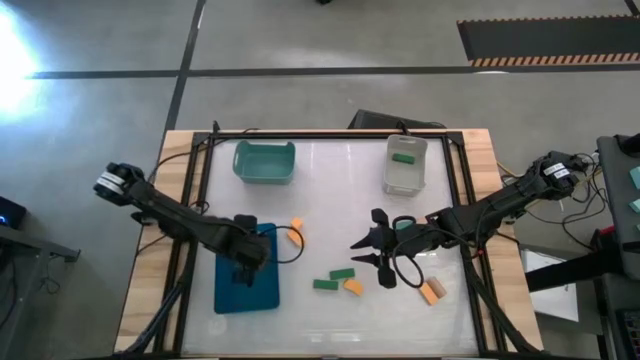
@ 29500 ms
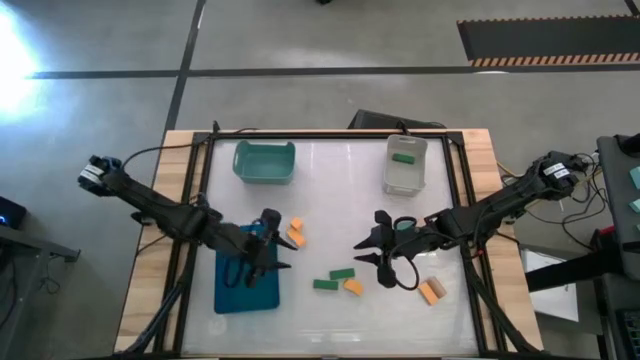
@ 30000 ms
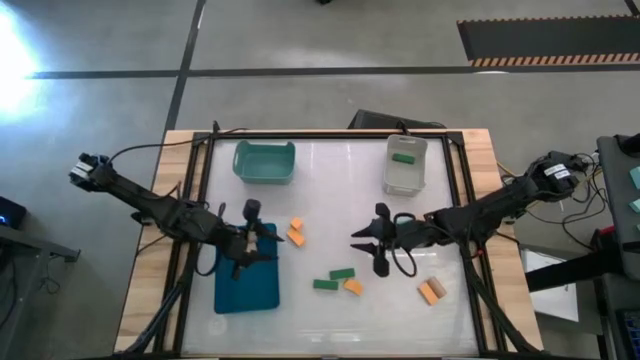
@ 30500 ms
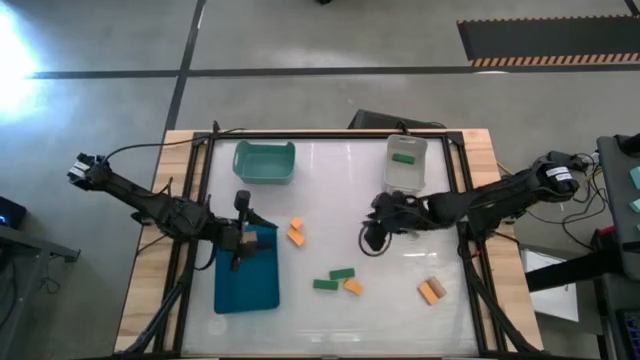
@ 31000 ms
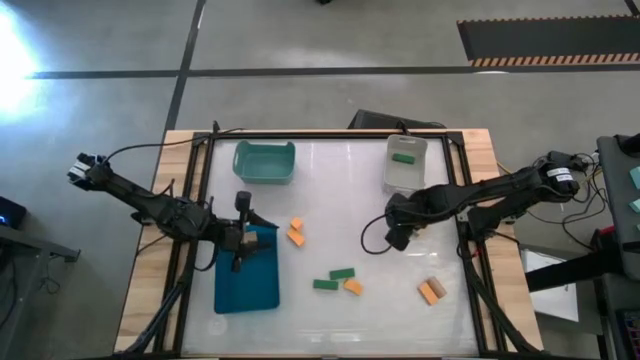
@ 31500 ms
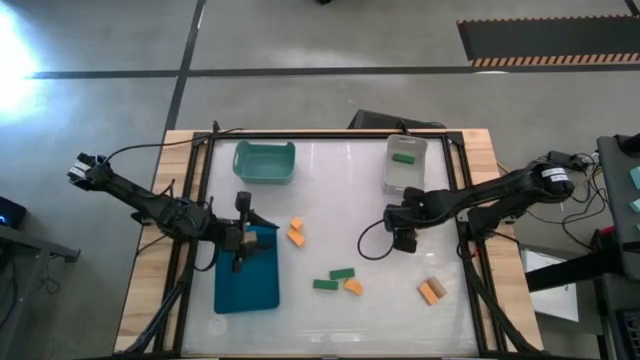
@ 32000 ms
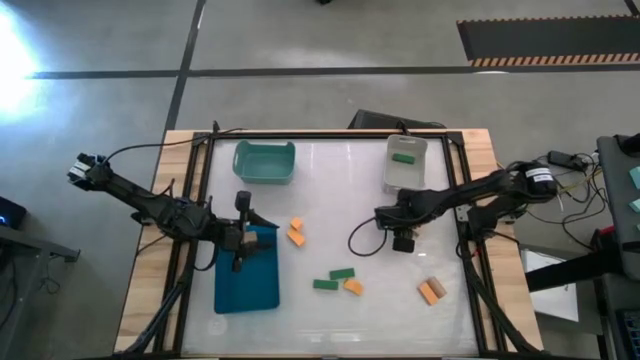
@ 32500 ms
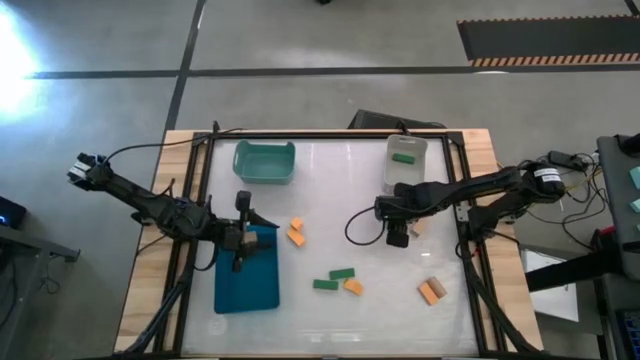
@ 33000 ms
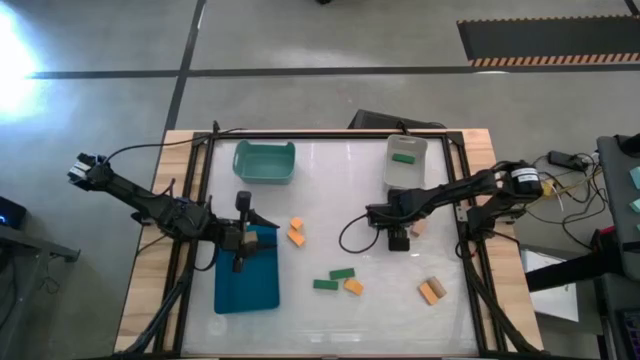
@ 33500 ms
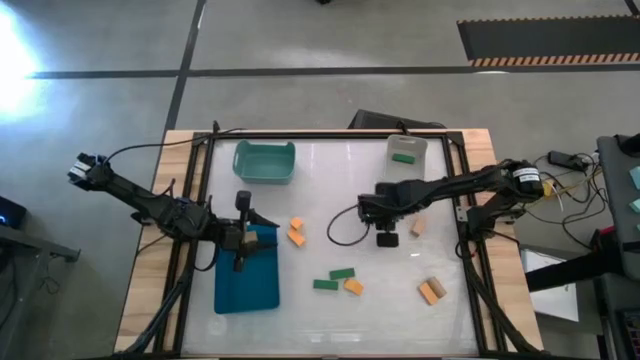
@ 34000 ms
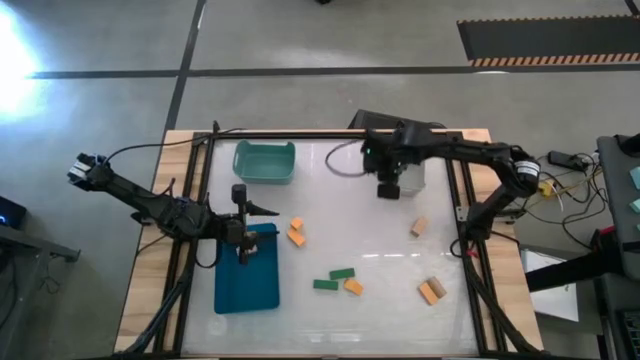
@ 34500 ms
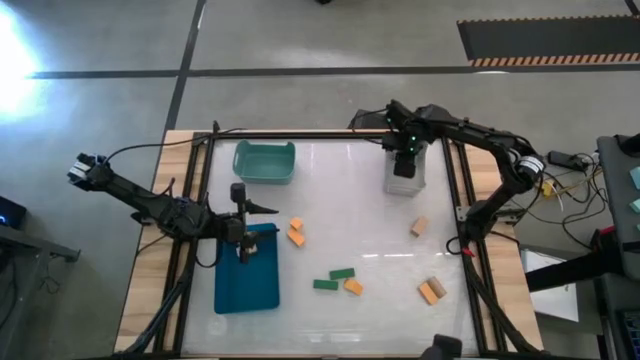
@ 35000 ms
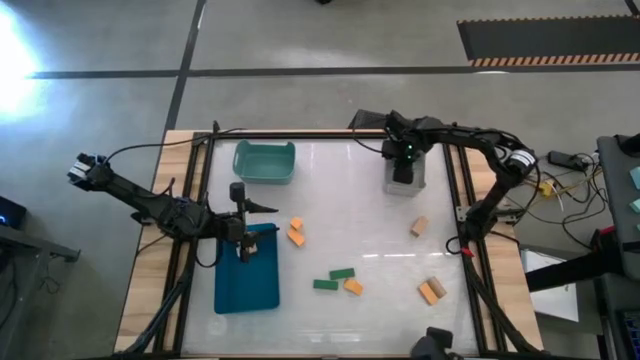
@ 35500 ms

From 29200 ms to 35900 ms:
Task: Sort & place blocks by color
Put the light green block into the gray bin

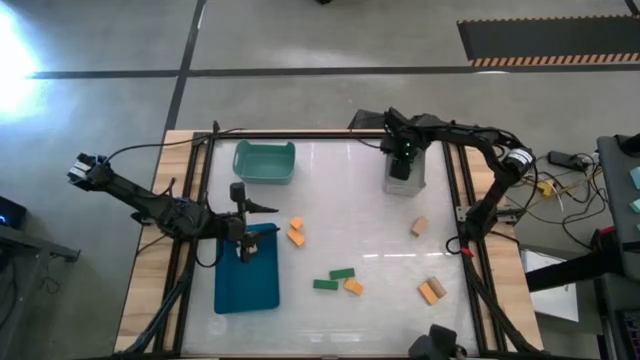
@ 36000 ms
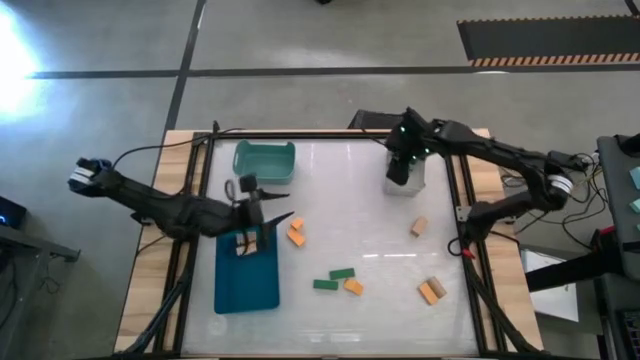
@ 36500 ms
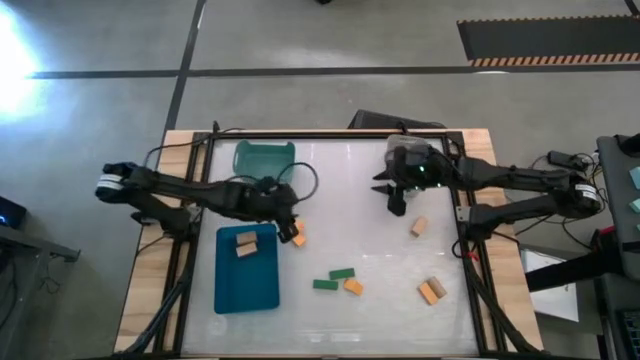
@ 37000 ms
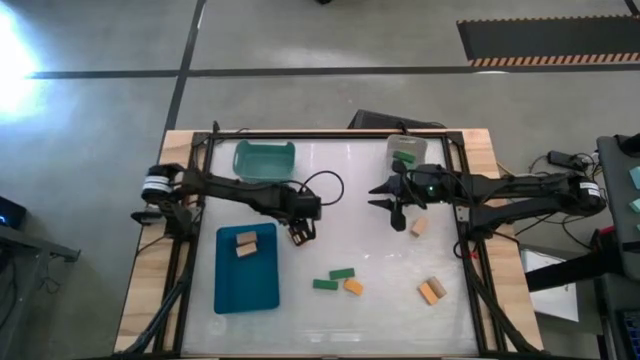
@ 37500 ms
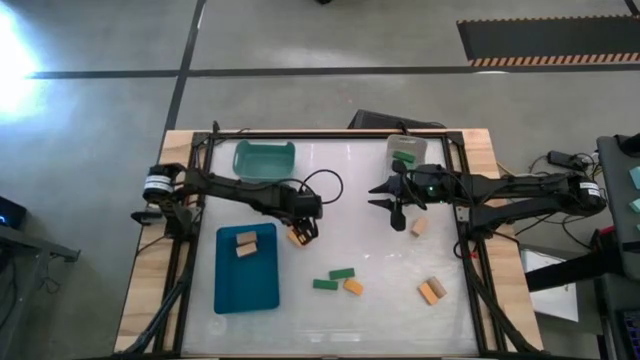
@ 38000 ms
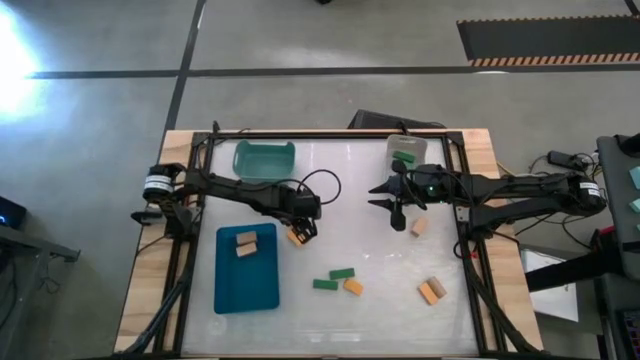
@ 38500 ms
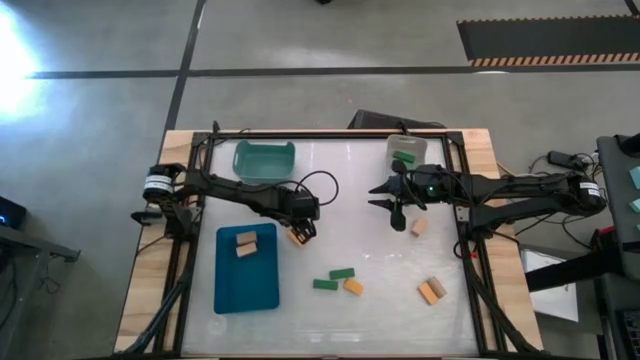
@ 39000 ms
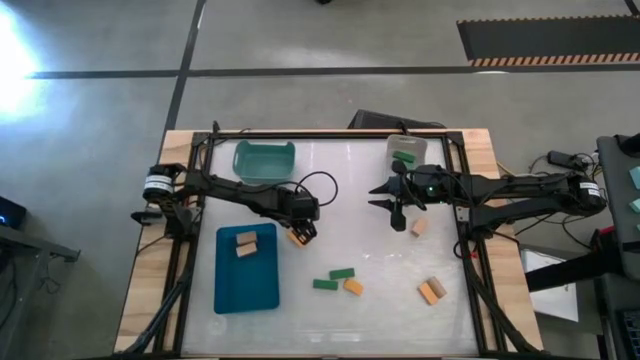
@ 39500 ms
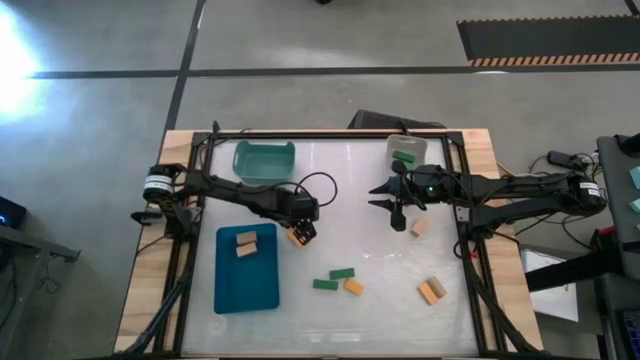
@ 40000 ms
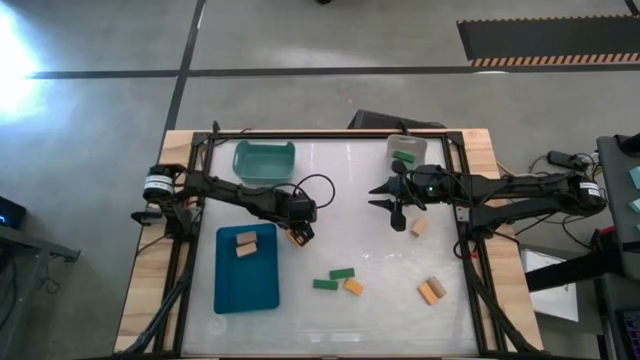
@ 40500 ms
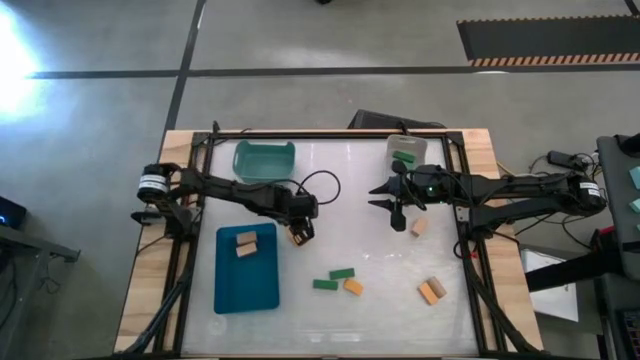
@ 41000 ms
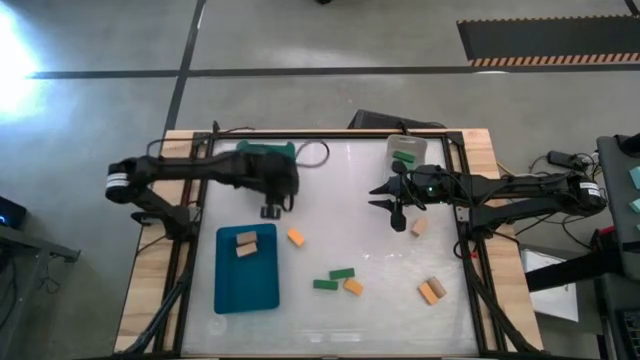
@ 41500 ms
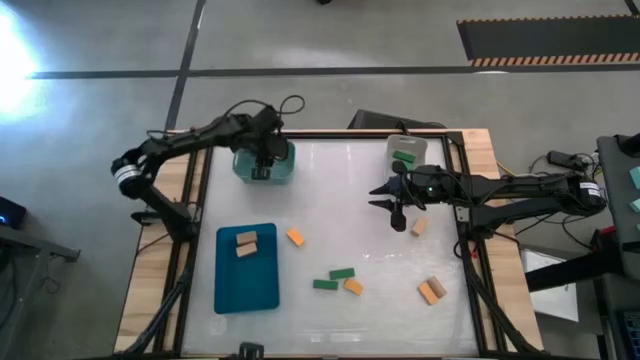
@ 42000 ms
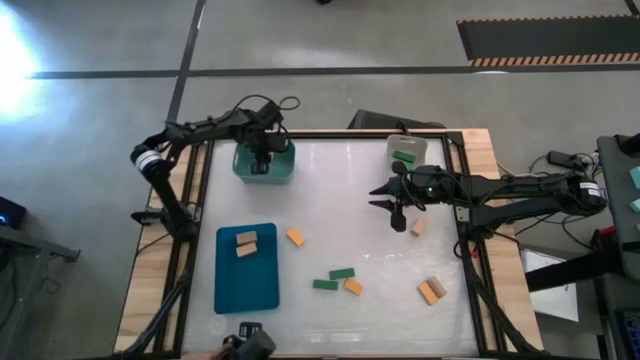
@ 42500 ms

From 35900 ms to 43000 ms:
Put the yellow block into the green bin

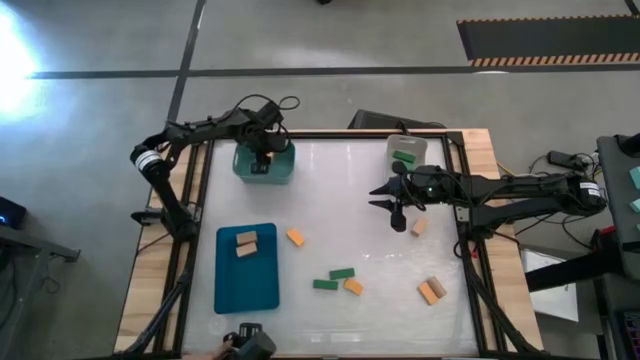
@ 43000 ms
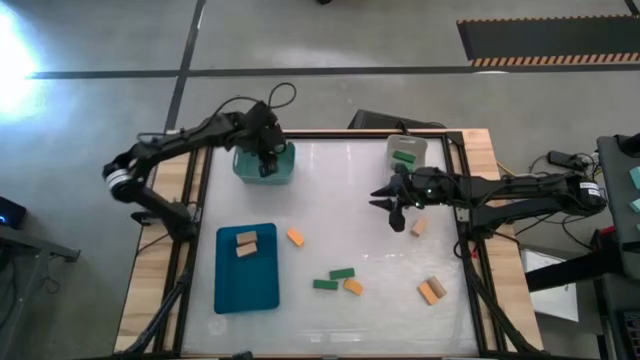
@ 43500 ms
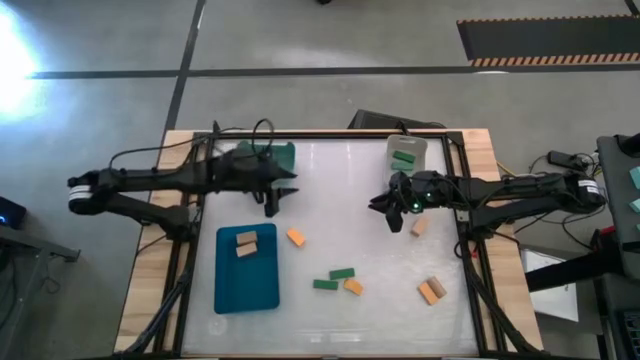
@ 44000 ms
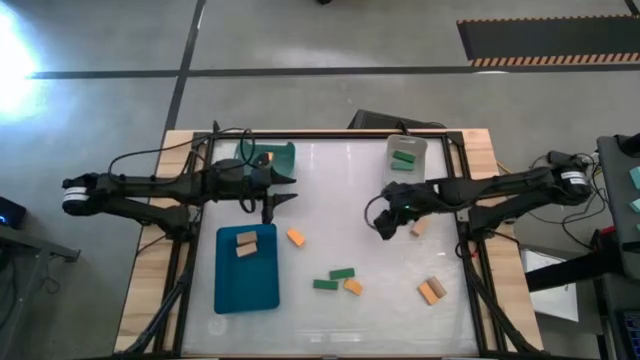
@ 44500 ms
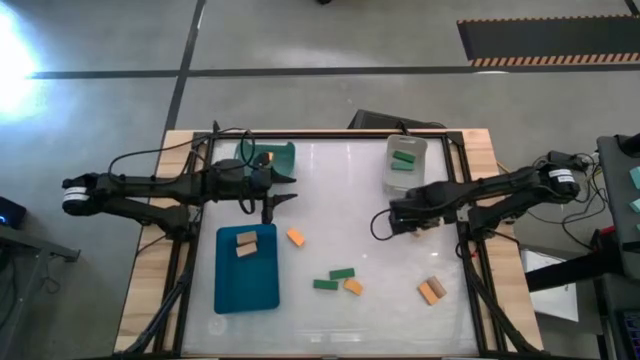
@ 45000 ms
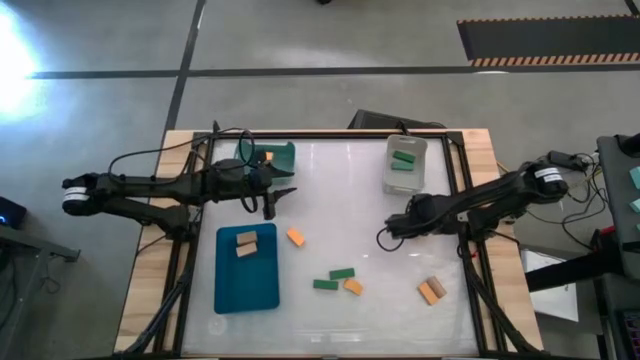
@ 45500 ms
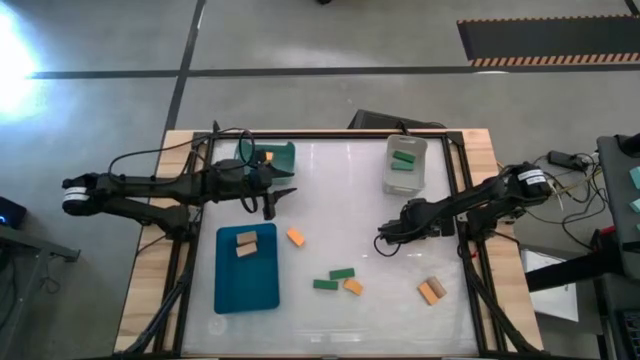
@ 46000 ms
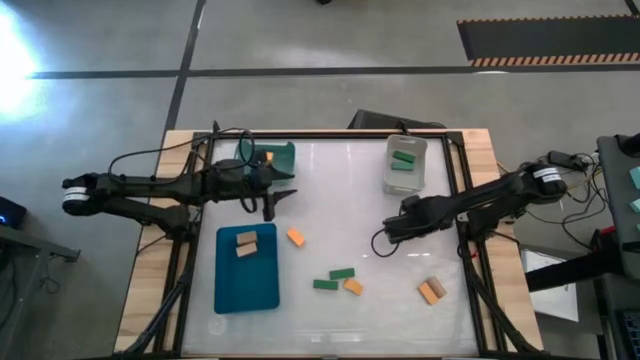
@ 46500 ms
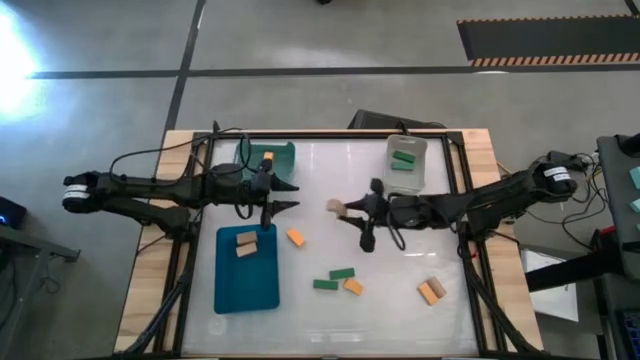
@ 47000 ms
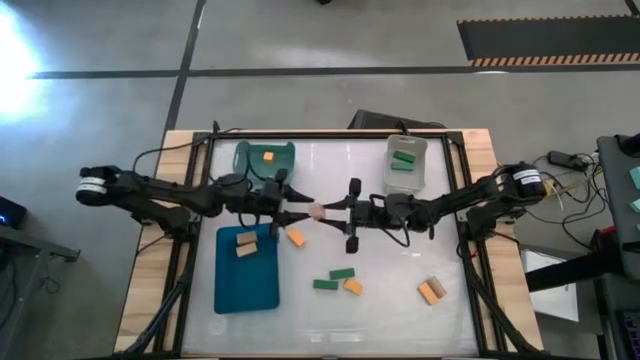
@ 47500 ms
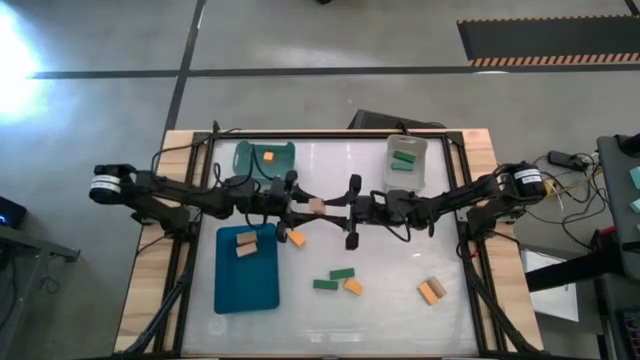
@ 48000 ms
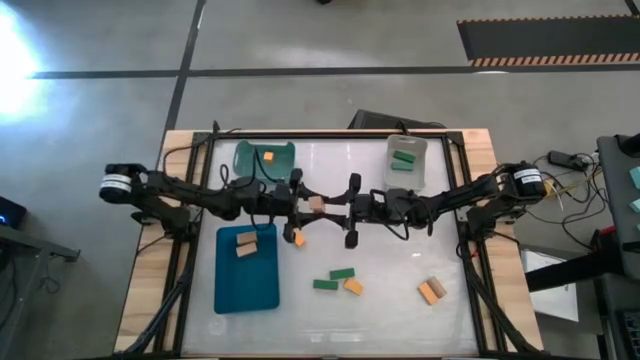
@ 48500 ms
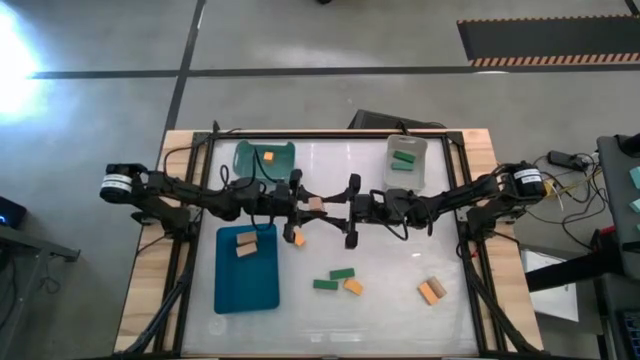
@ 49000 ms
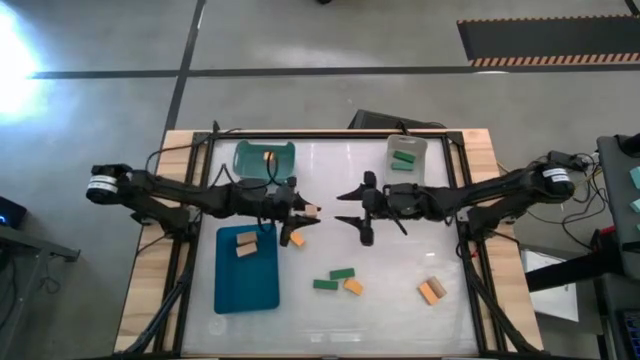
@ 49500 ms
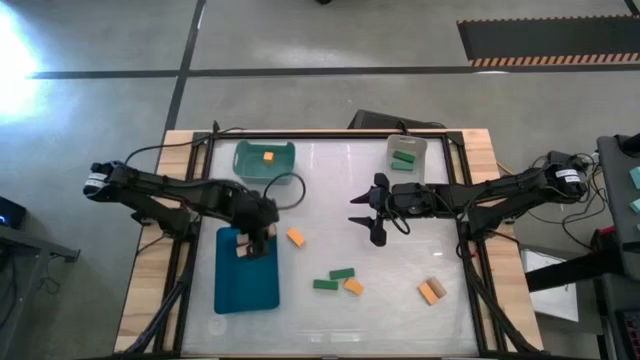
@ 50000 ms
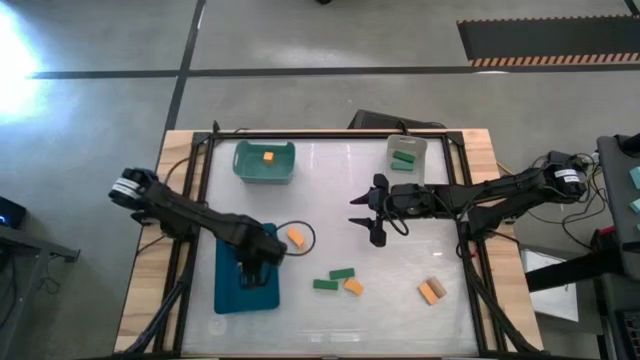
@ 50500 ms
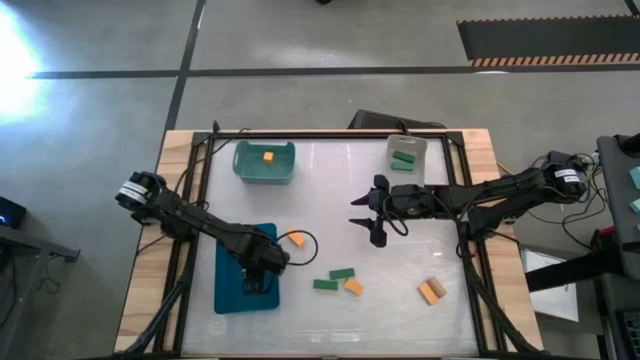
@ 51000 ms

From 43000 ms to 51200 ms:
Put the light brown block into the blue bin
